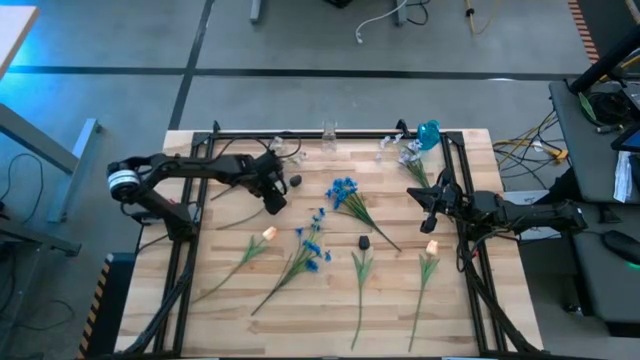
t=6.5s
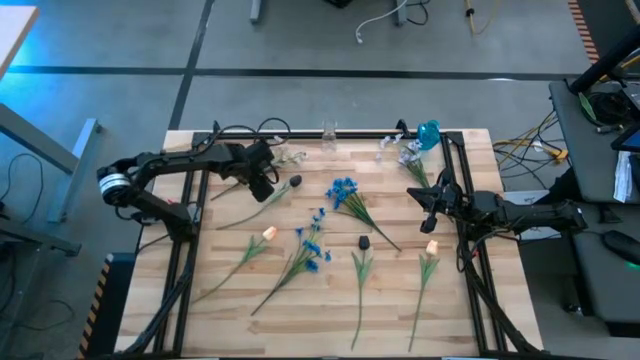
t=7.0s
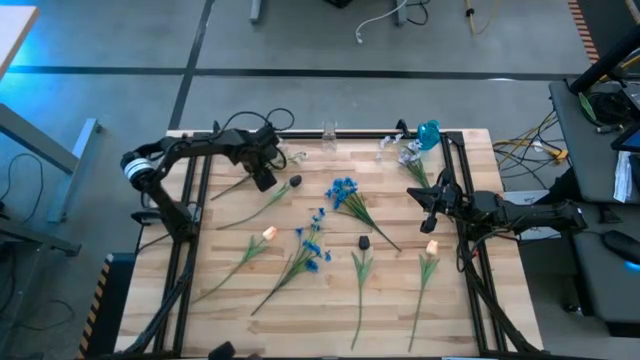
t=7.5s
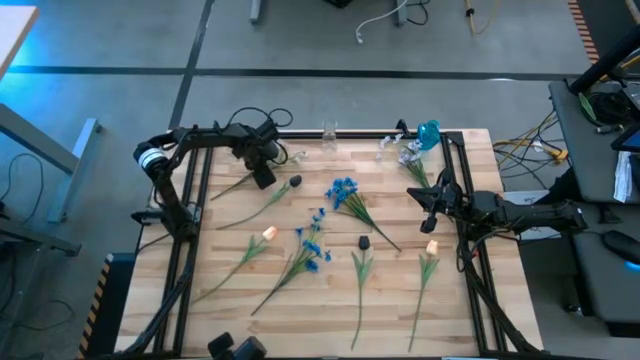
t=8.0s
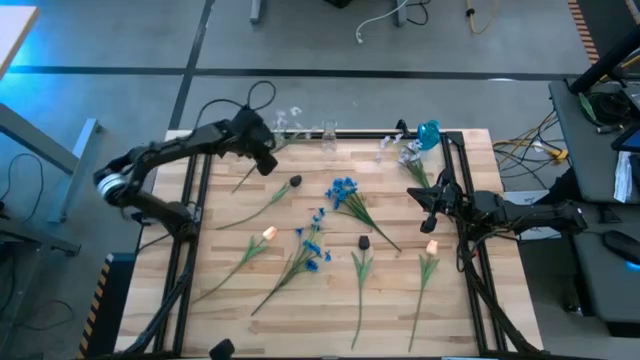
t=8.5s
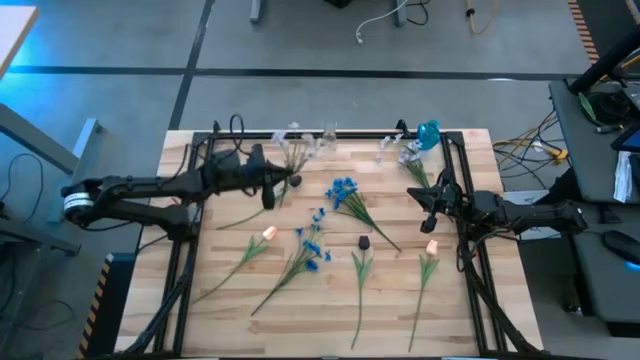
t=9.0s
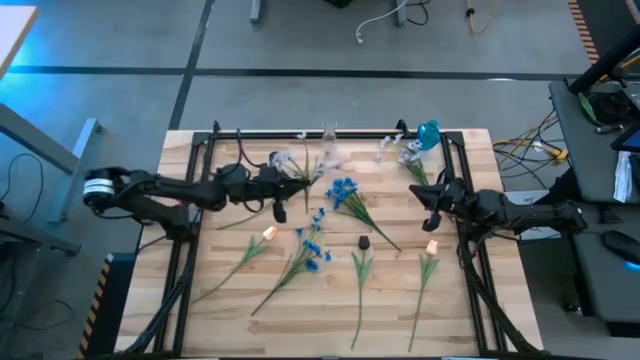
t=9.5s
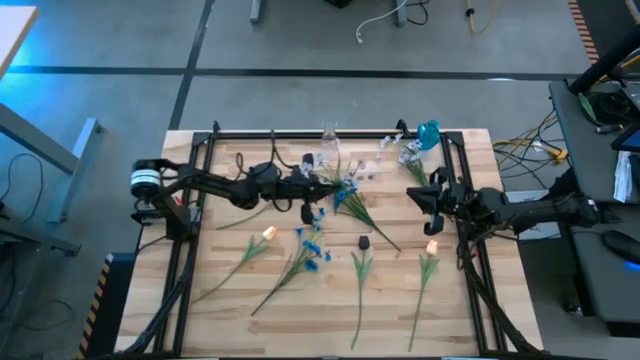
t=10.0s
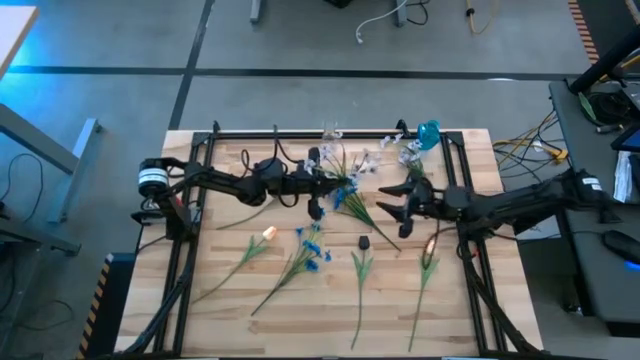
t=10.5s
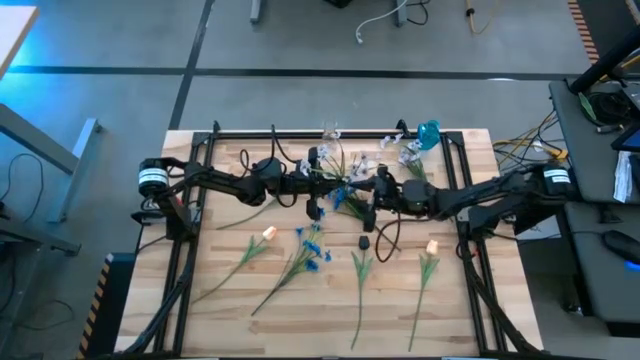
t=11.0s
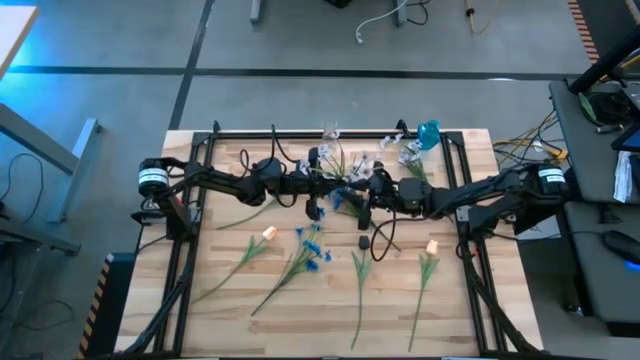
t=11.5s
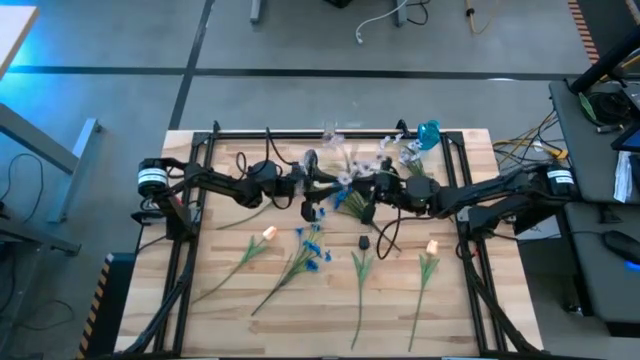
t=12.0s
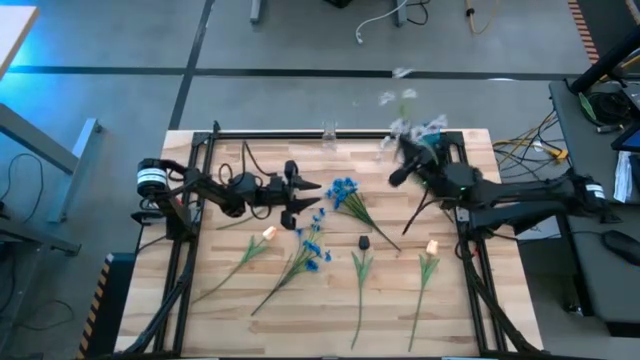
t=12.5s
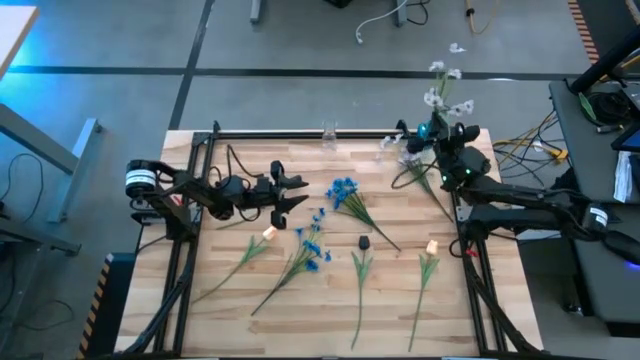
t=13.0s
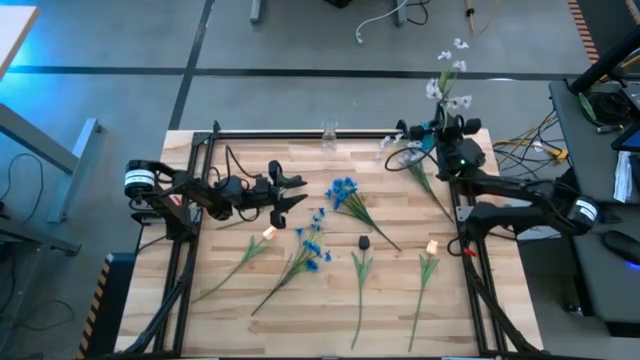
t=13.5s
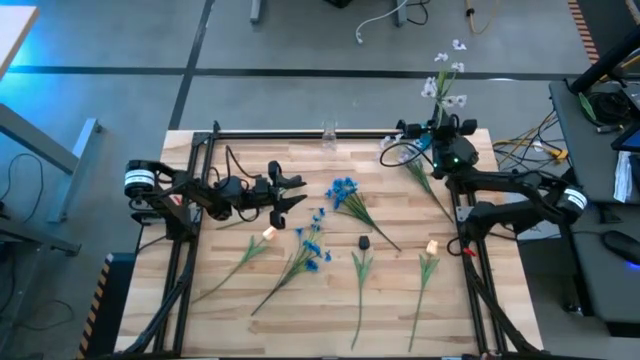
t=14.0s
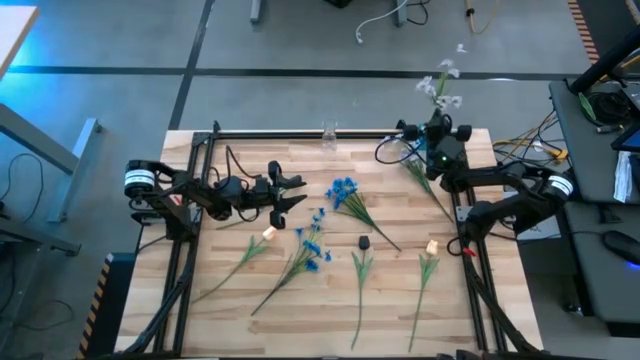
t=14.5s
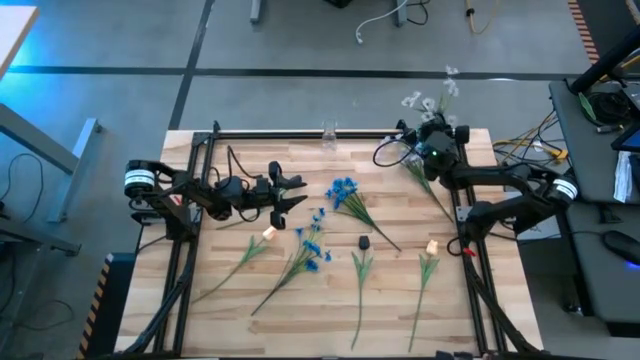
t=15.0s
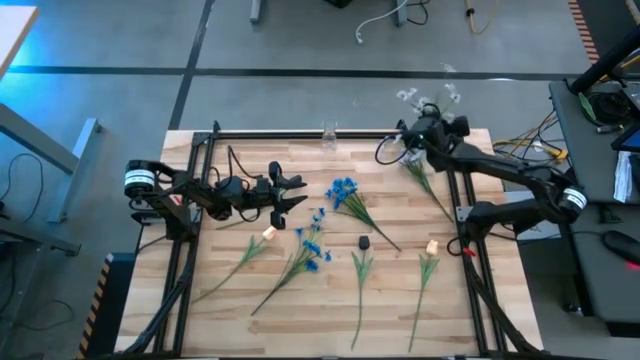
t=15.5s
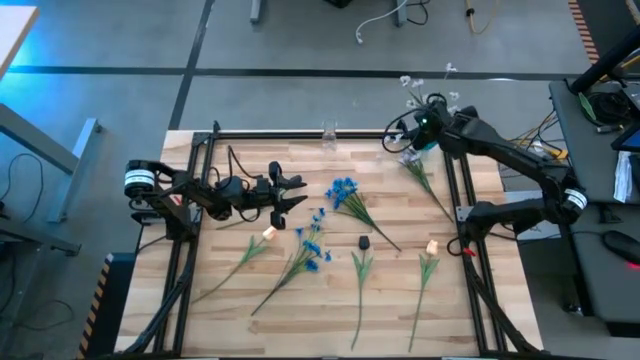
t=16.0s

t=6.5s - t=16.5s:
Task: Sort flowers into vase by color
Put the left white flowers into the blue vase

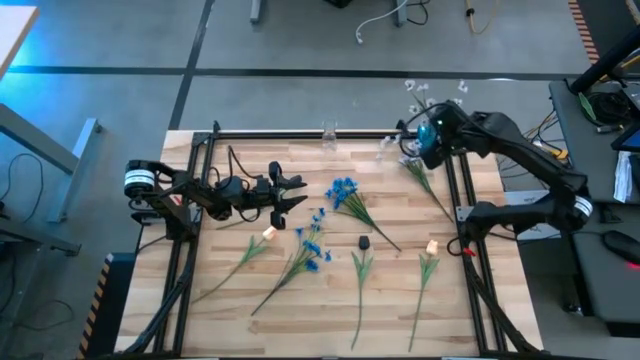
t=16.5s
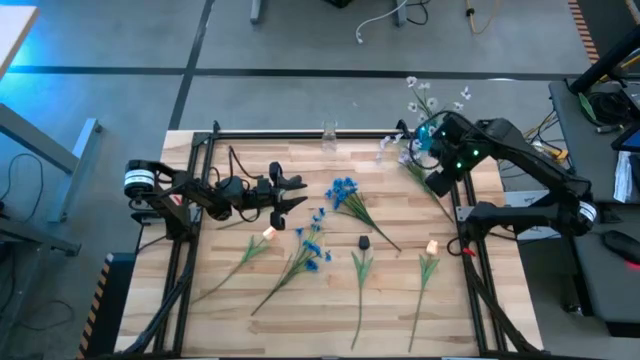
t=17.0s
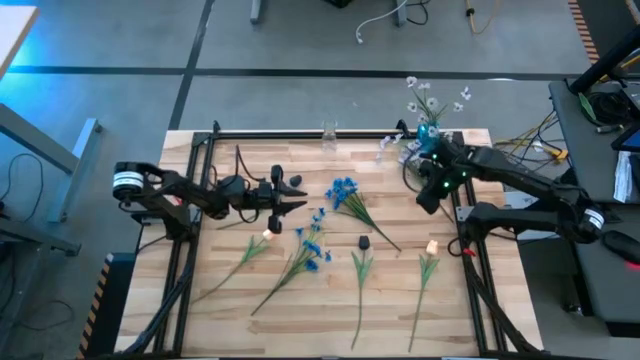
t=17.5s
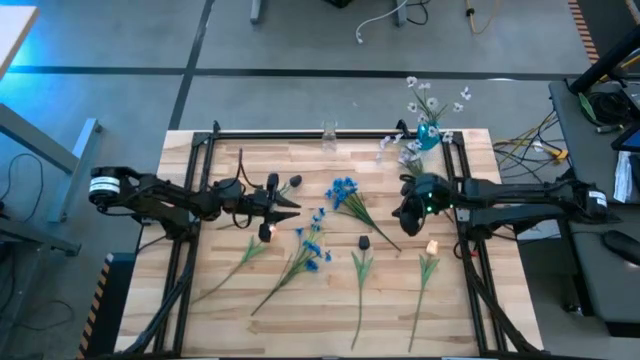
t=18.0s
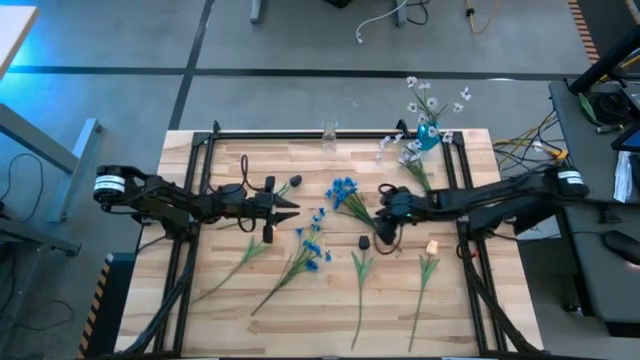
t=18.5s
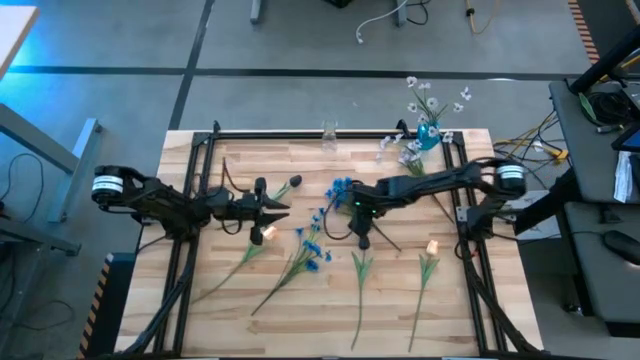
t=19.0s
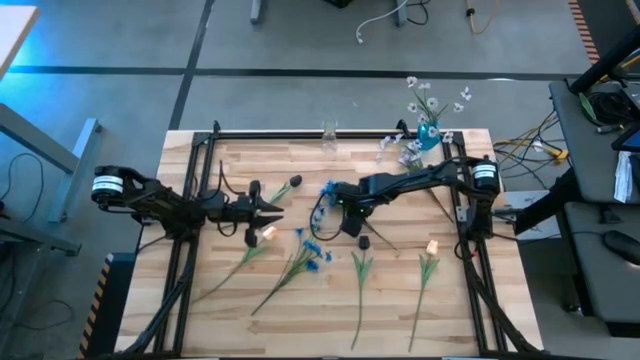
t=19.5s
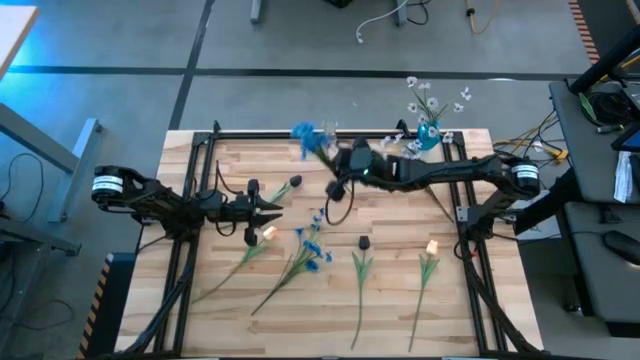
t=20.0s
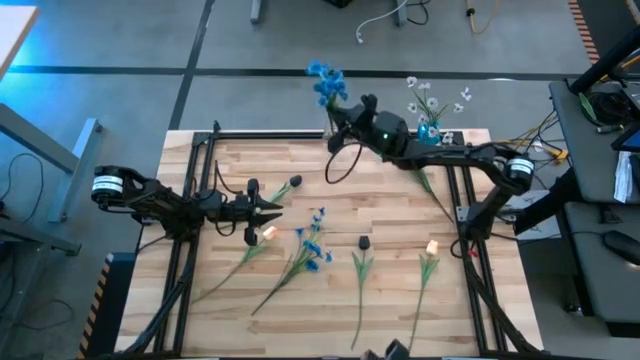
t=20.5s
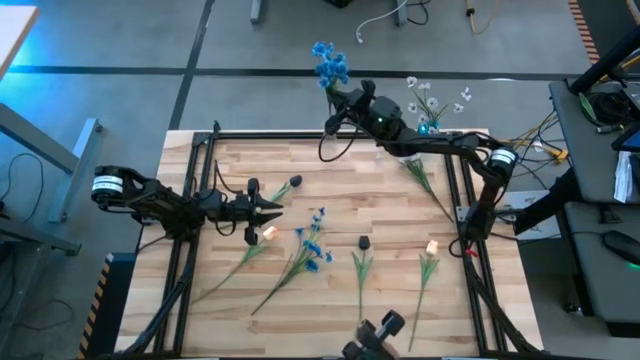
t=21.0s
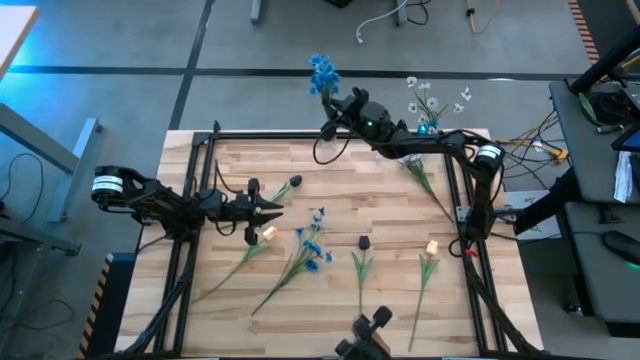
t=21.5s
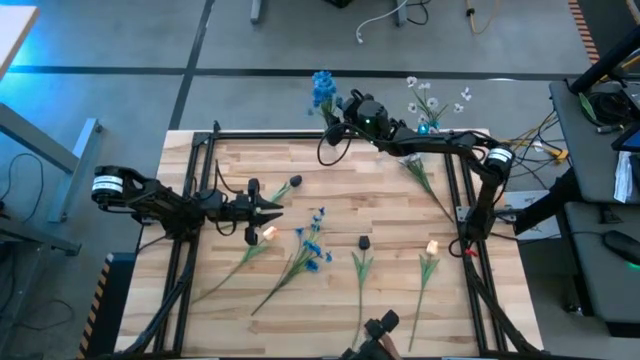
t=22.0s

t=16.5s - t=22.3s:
Put the top blue flowers into the transparent vase

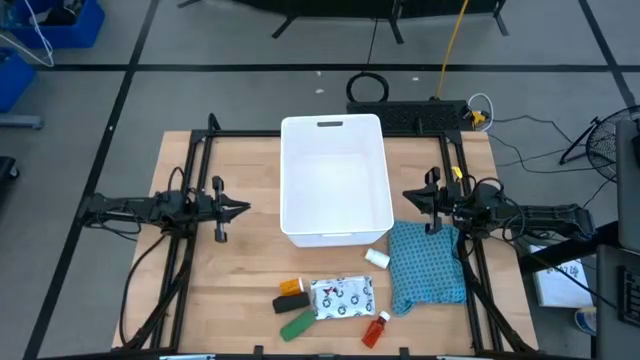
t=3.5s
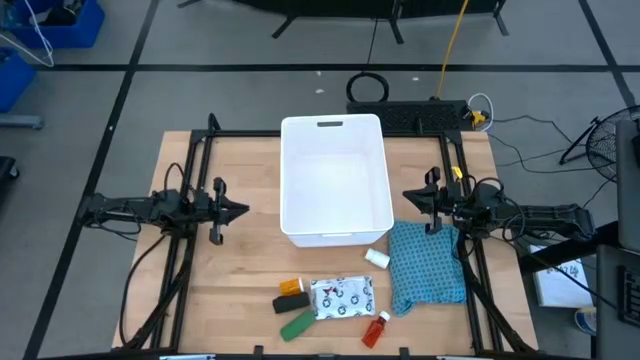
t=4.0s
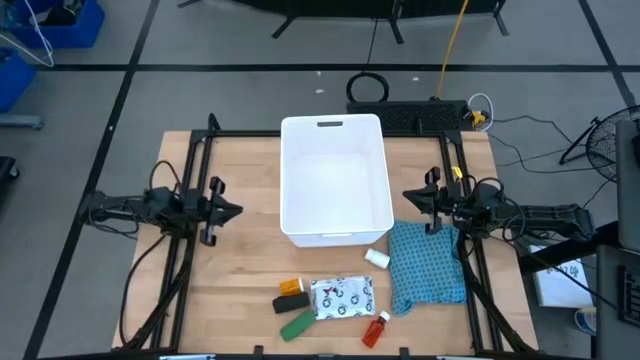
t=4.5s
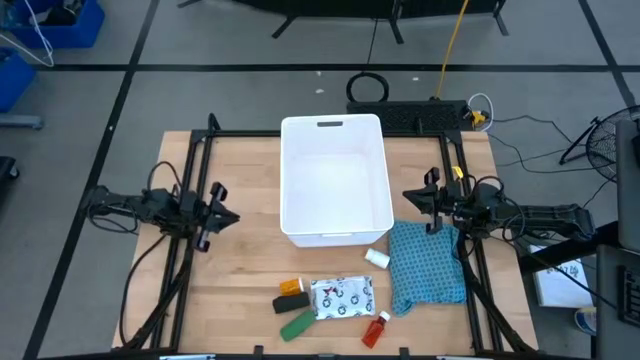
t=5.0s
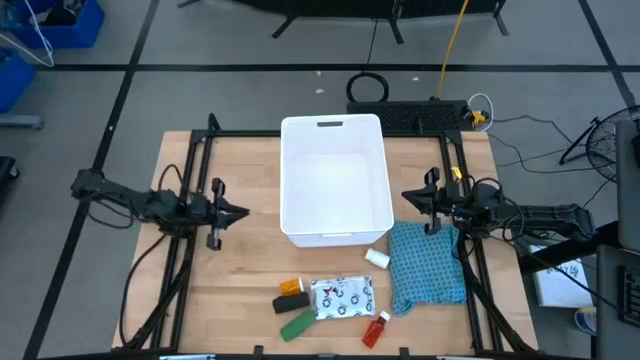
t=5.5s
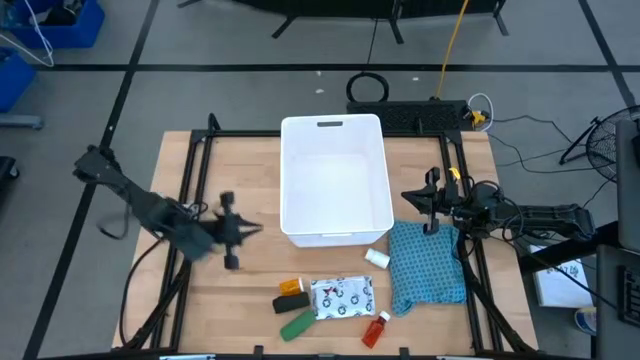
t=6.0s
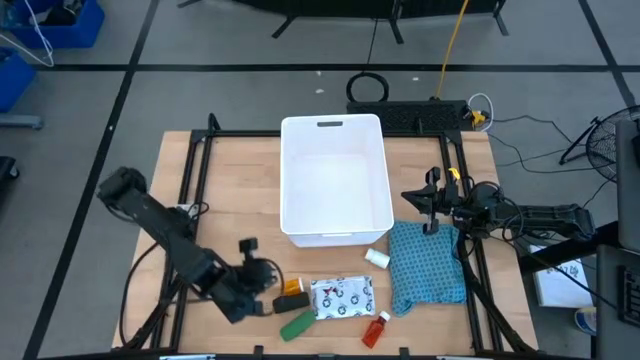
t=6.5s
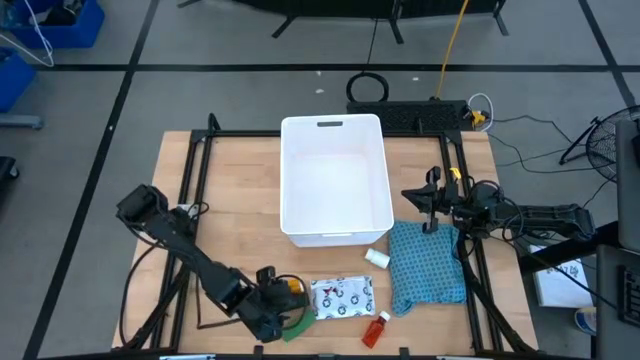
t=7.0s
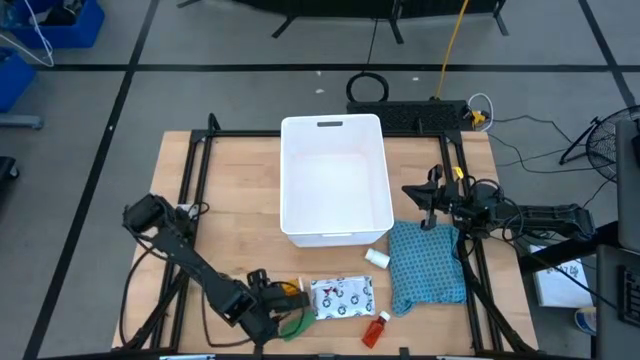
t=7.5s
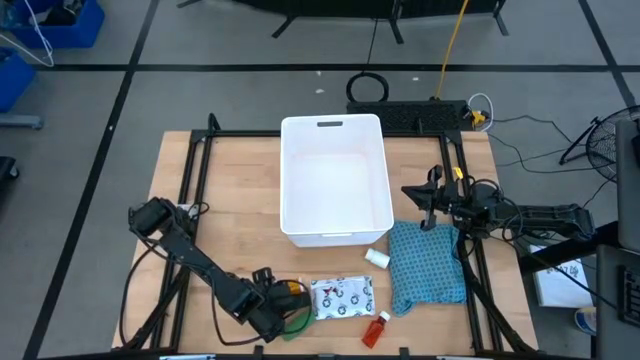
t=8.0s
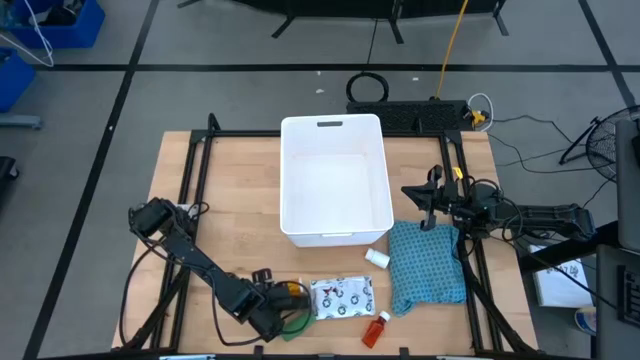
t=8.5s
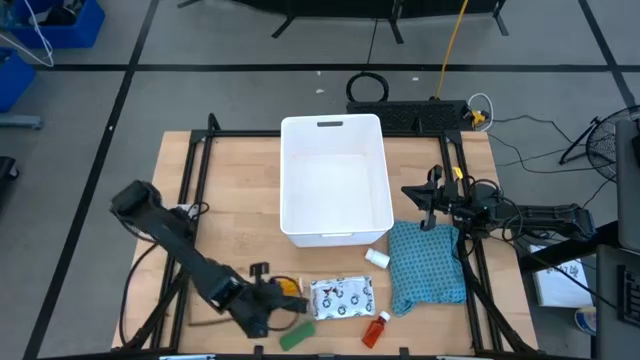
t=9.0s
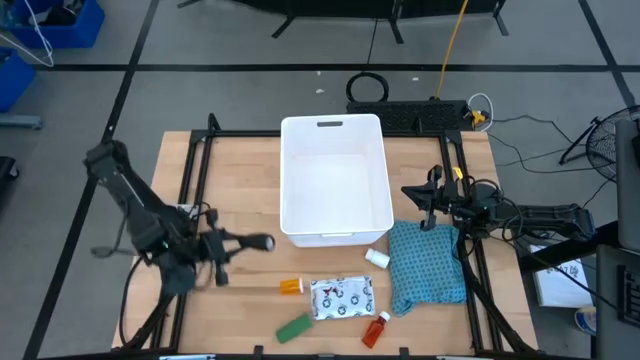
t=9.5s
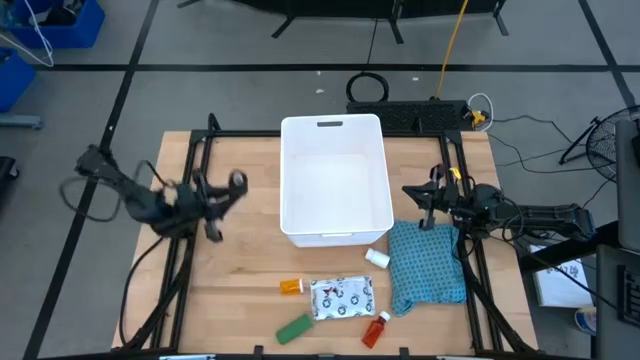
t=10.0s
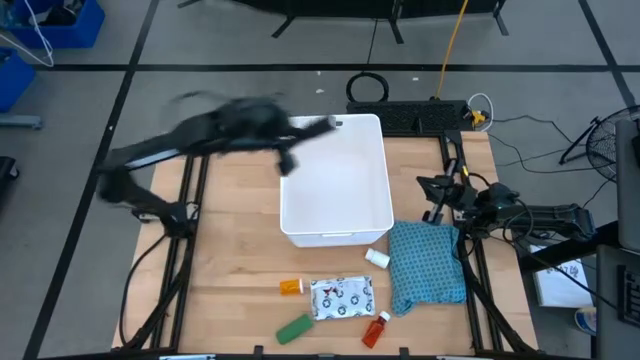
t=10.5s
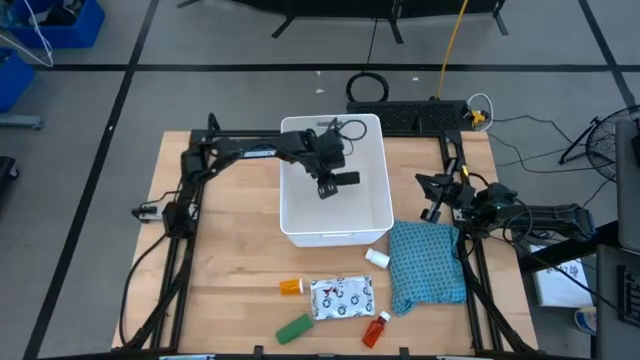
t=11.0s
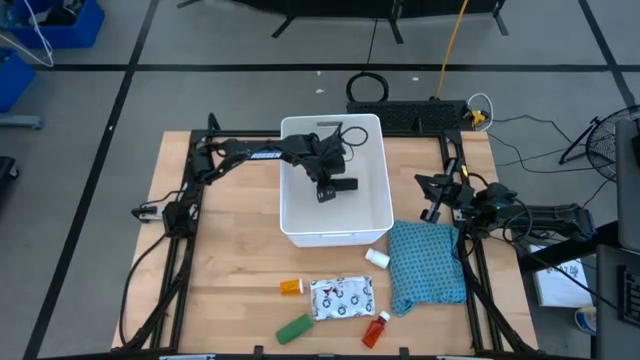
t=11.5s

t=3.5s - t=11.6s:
Task: Pick & place medical supplies in basket/bin
Put the black bandage into the white bin
